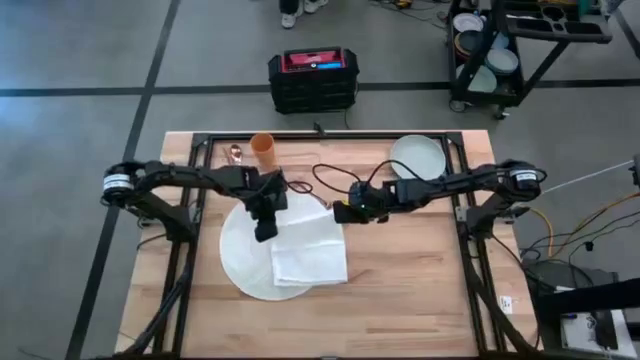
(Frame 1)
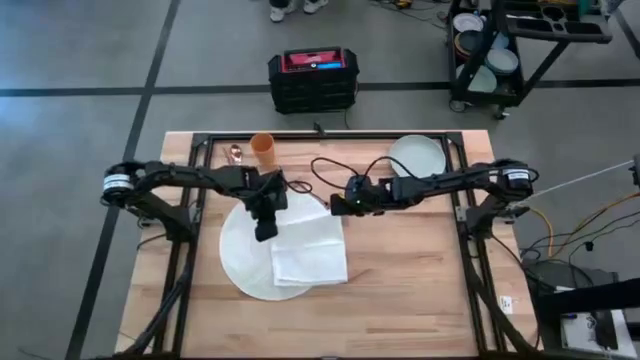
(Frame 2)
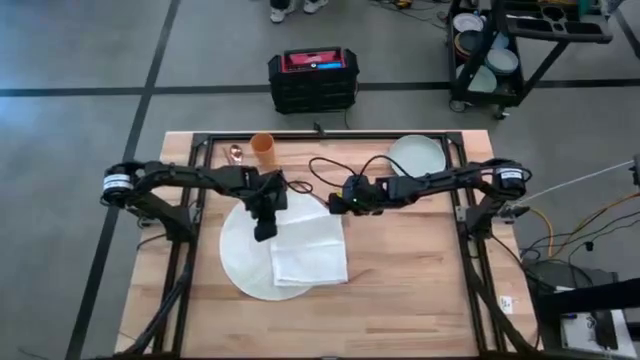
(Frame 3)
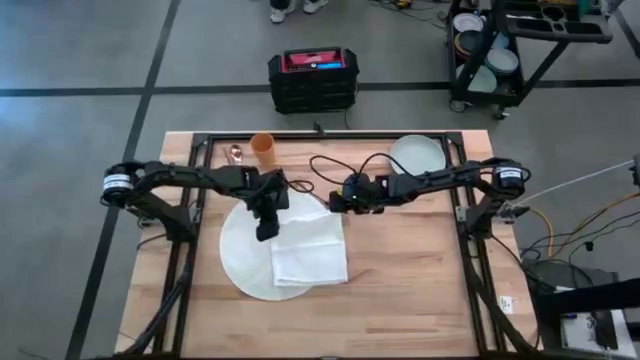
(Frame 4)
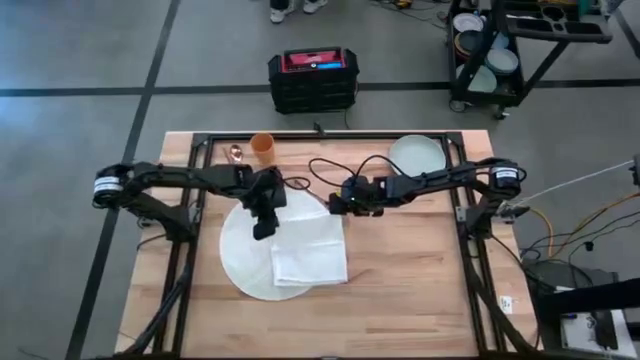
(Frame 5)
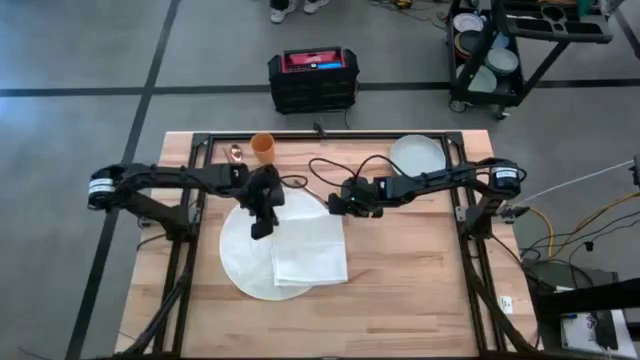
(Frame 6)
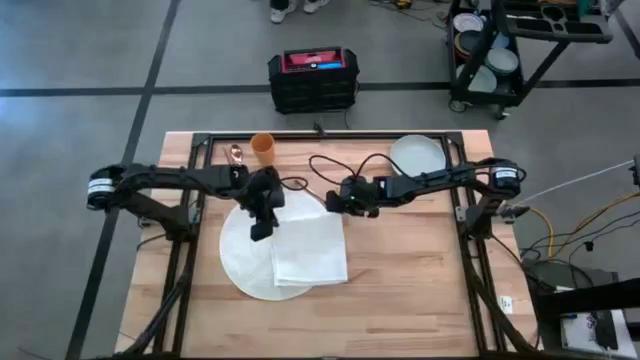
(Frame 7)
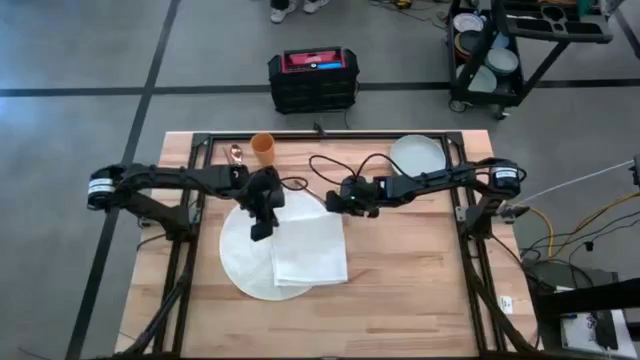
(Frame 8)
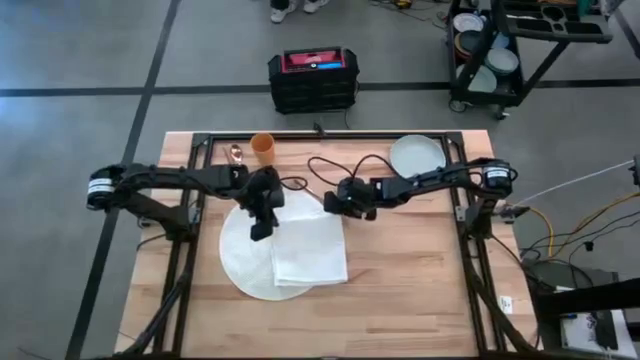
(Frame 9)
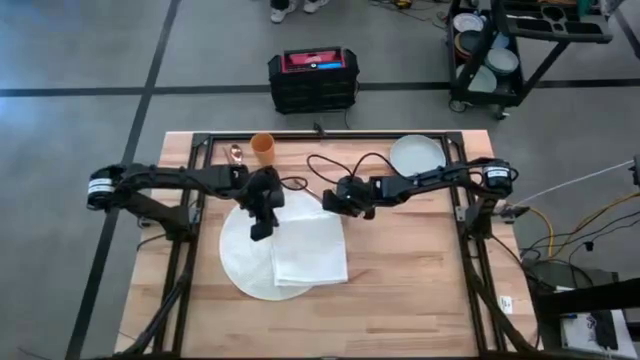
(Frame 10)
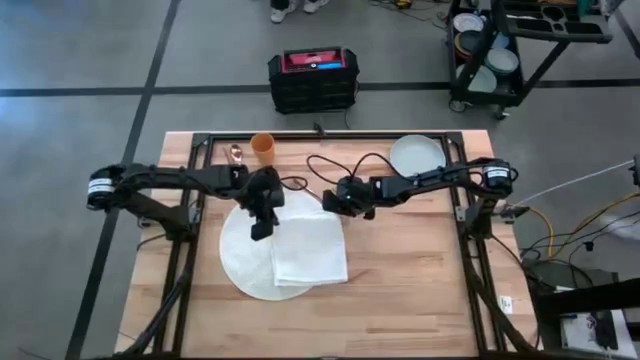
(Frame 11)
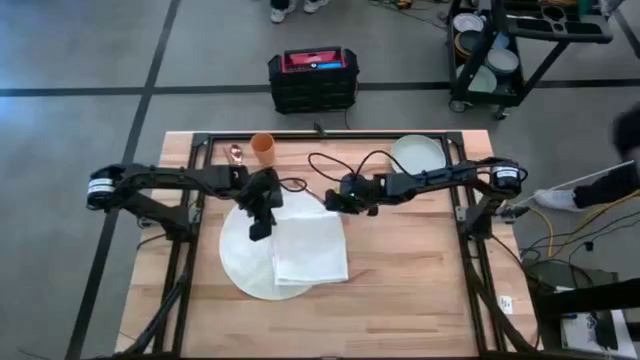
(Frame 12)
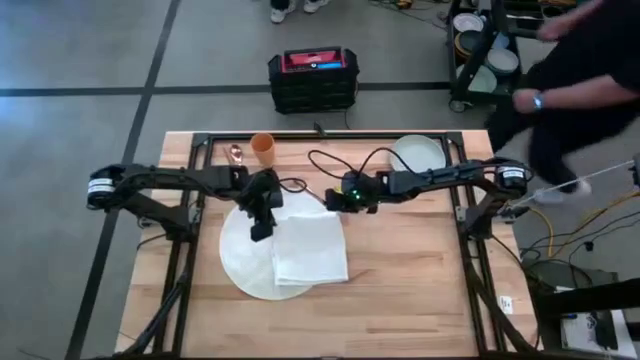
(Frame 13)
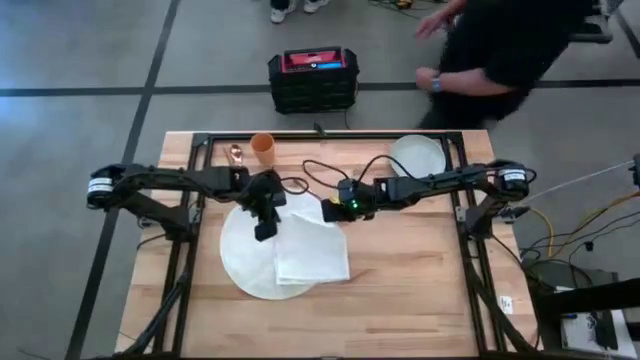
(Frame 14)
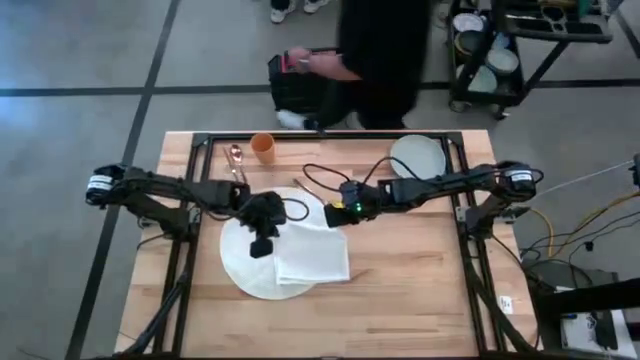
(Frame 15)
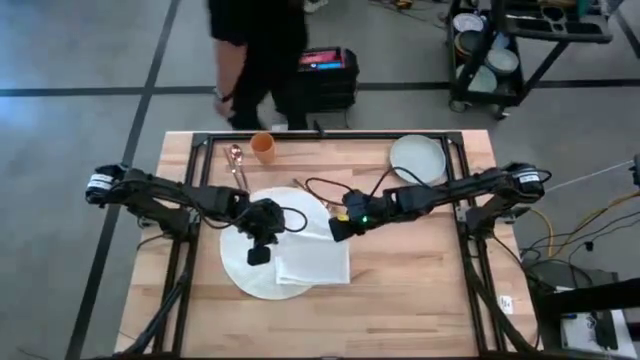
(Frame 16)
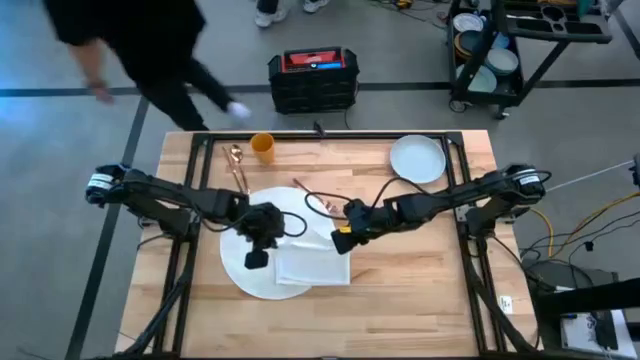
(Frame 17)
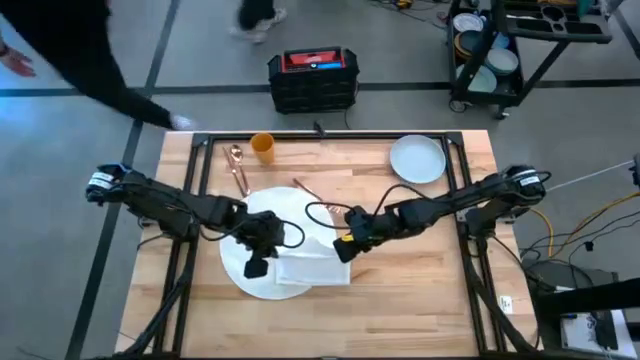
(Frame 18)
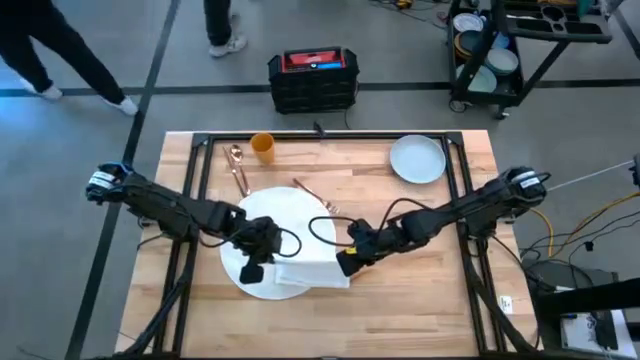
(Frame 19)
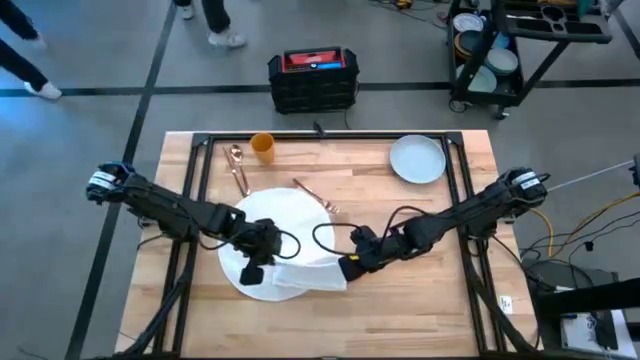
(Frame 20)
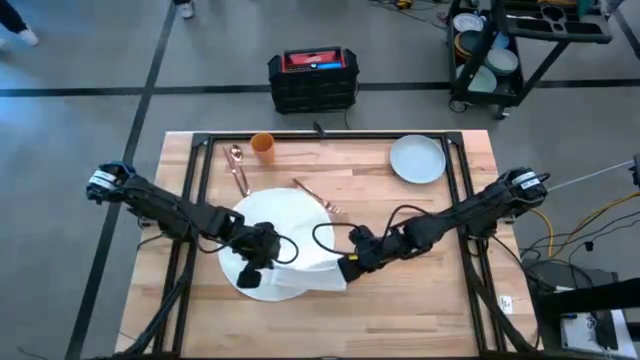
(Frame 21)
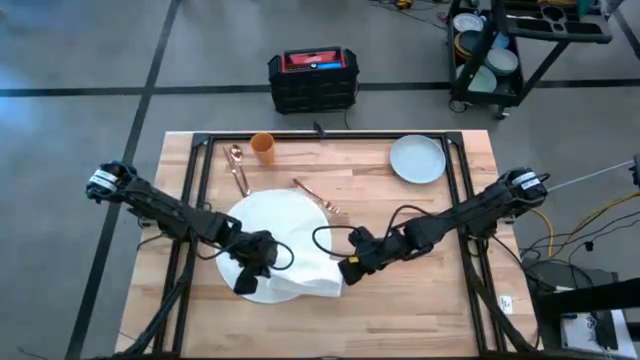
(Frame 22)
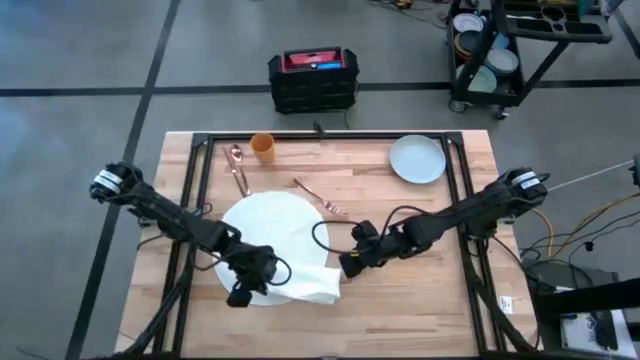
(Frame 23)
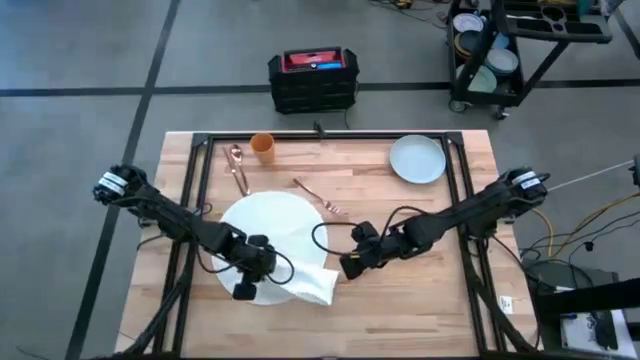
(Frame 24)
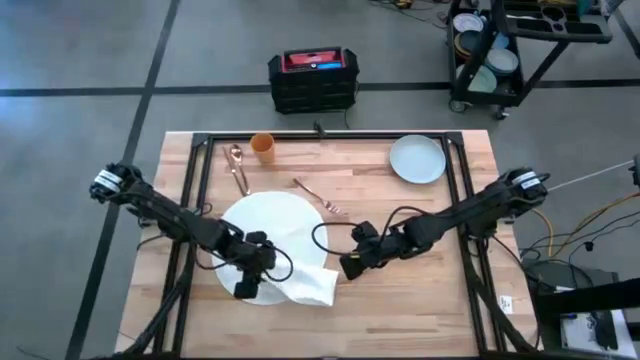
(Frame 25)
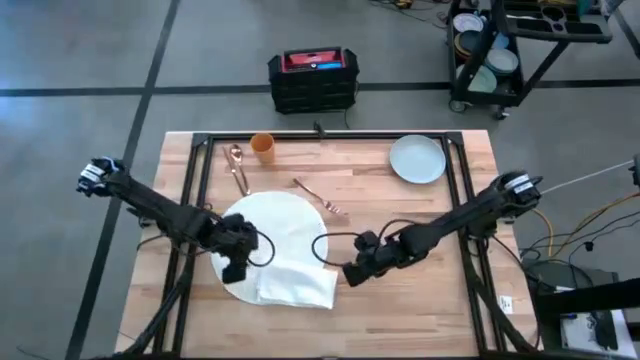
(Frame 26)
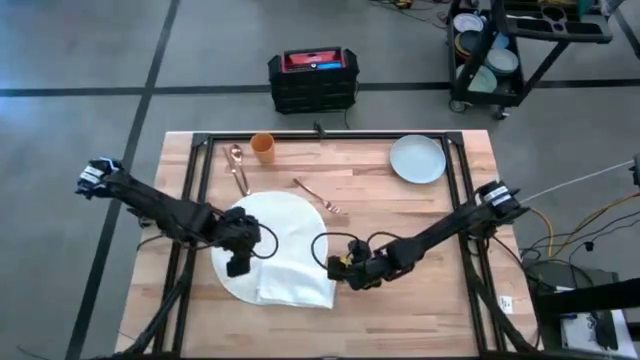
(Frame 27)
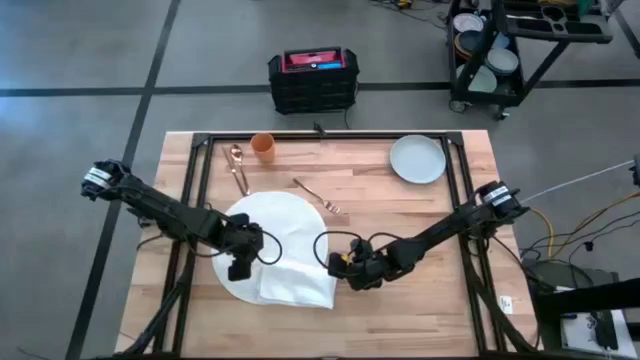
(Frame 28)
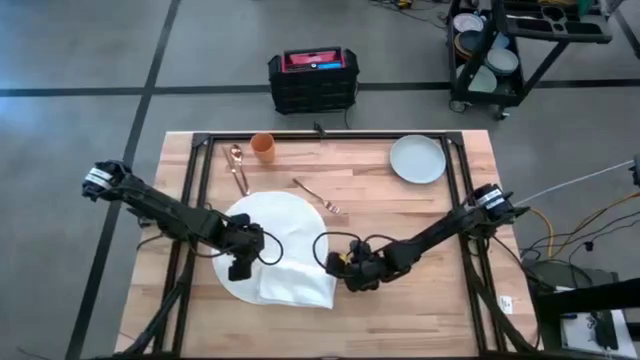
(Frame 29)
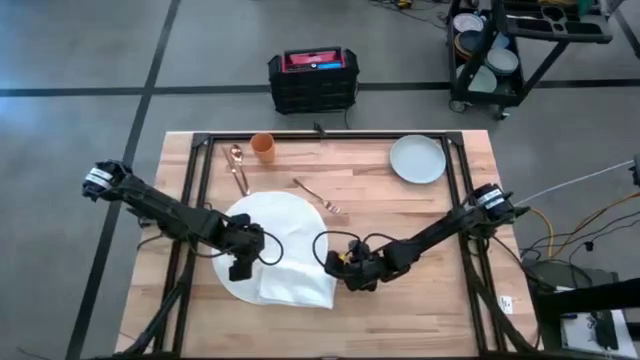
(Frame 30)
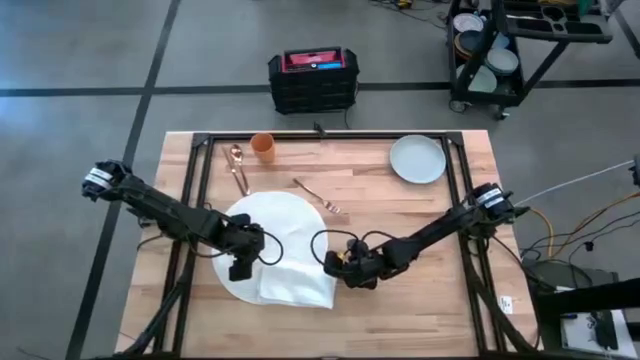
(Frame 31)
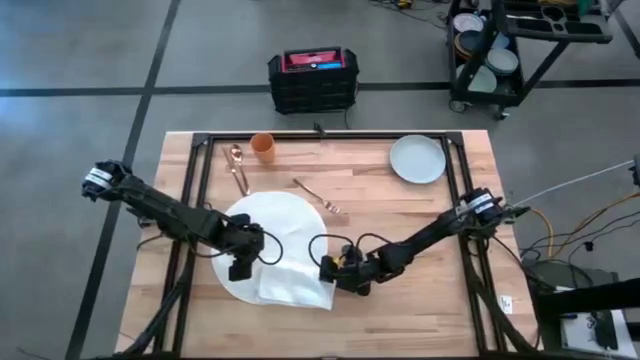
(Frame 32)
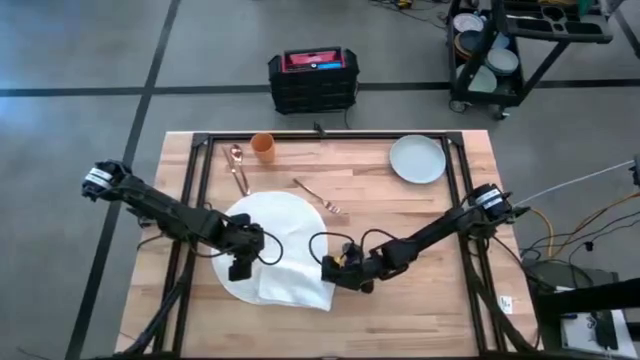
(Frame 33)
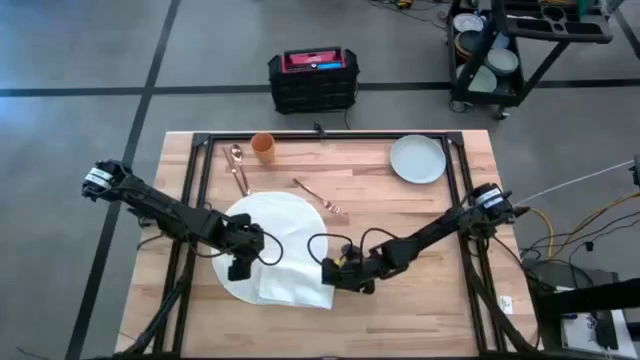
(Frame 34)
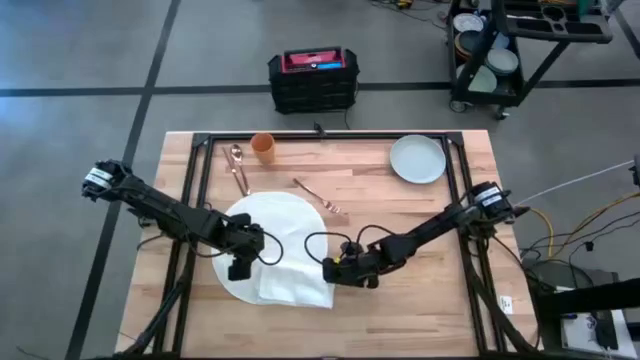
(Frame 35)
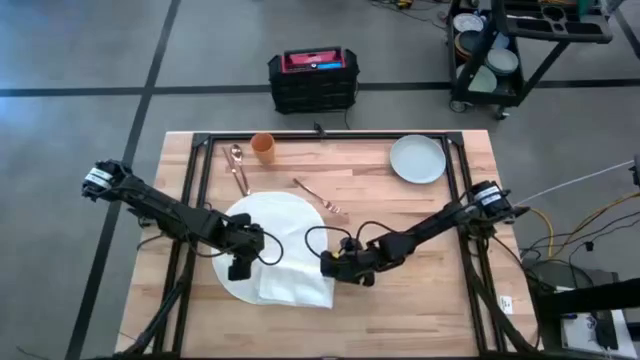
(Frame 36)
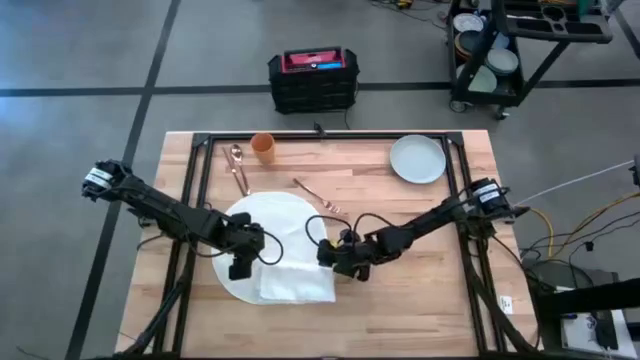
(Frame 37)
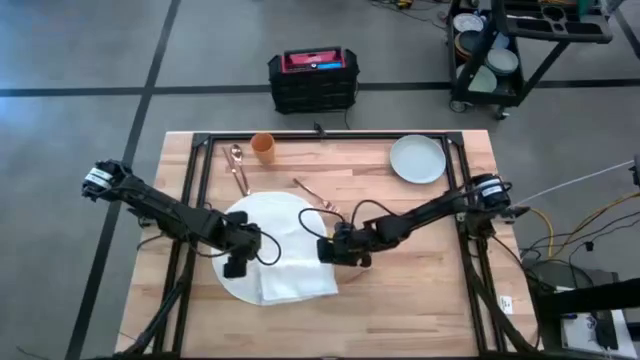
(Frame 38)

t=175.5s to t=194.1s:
Task: Set table place
Fold the white napkin

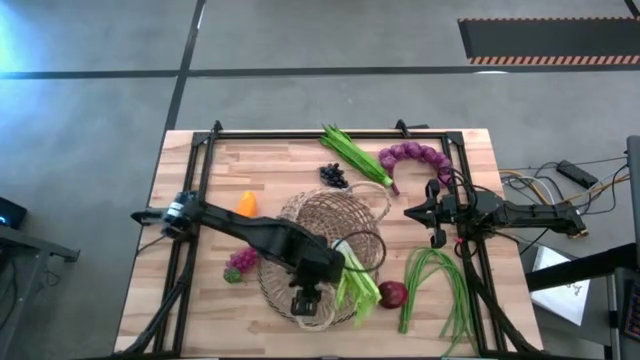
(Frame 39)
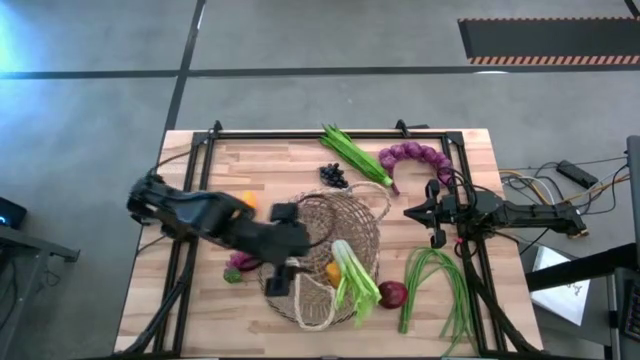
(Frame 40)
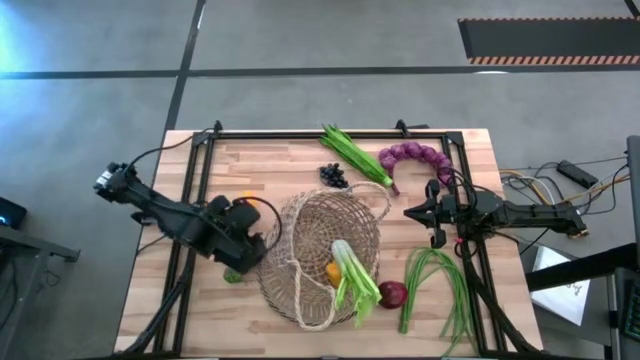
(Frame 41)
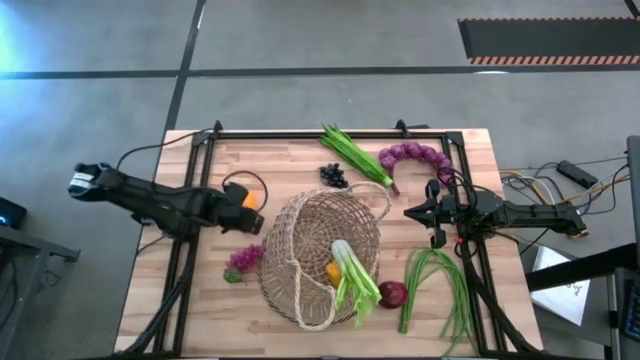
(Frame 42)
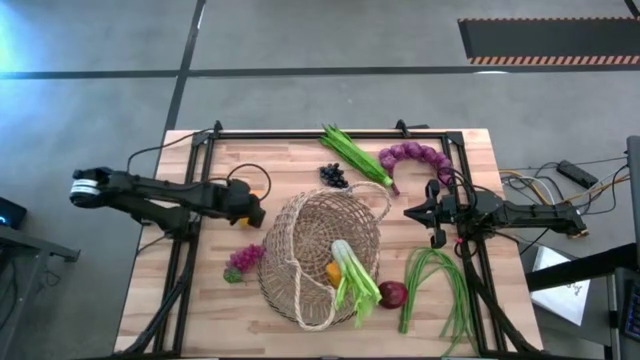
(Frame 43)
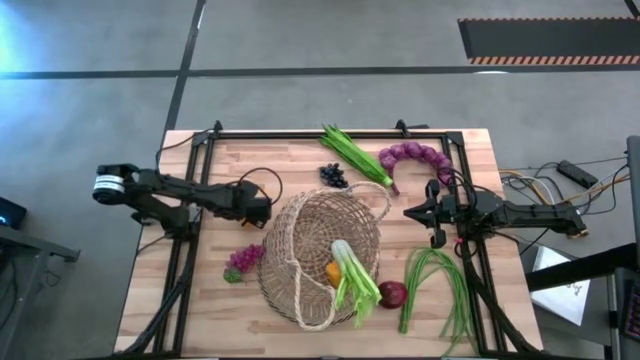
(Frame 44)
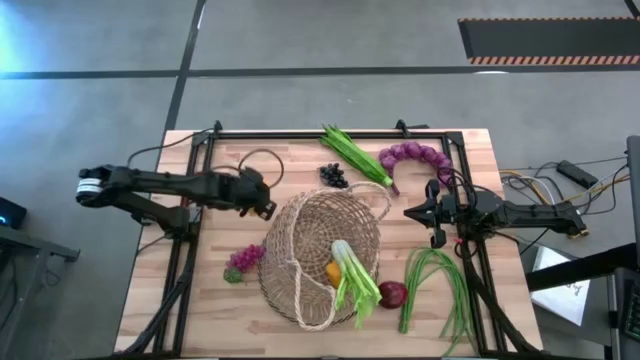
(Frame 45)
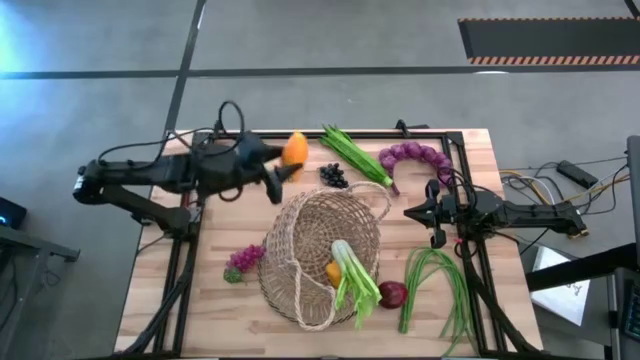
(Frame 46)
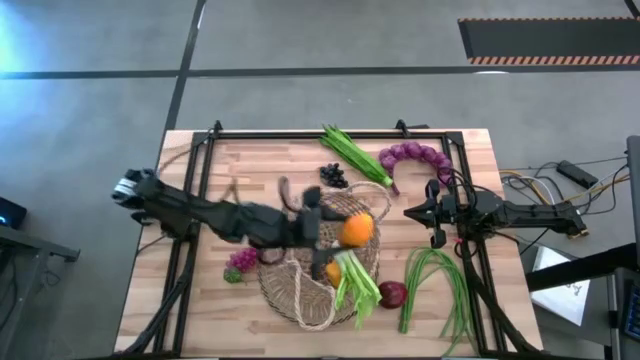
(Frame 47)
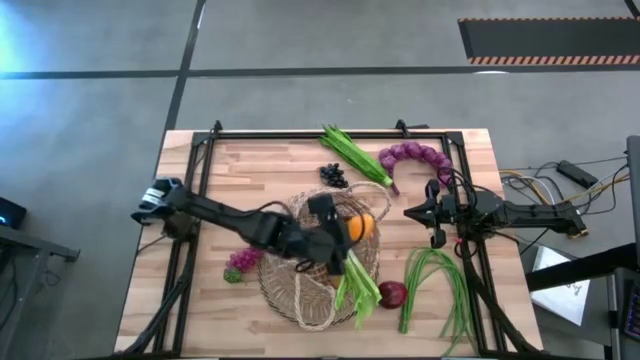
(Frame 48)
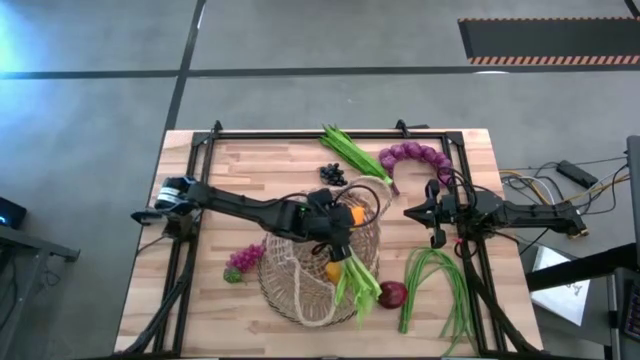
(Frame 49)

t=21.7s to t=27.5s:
Task: Build produce basket
Put the mango into the basket
